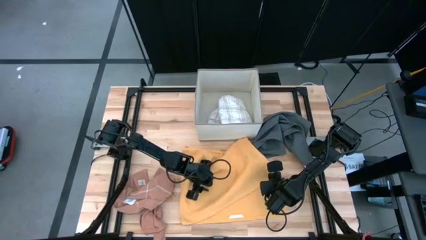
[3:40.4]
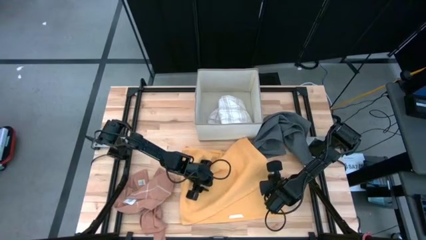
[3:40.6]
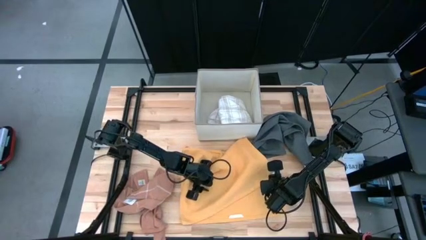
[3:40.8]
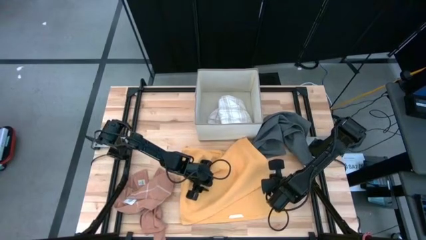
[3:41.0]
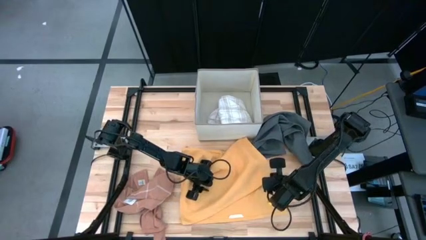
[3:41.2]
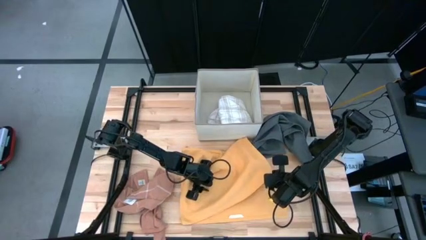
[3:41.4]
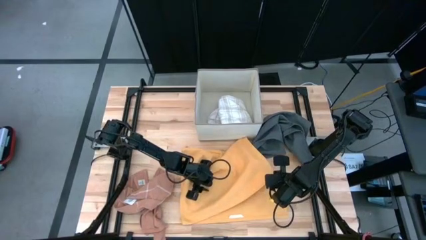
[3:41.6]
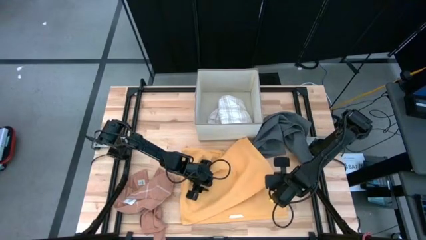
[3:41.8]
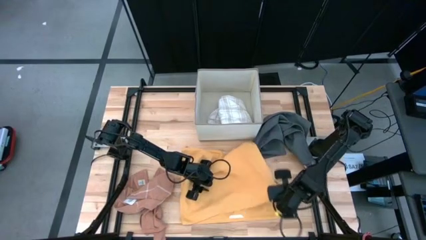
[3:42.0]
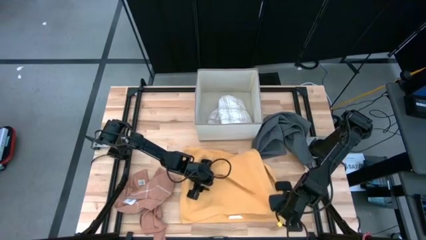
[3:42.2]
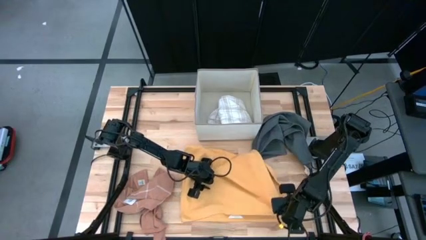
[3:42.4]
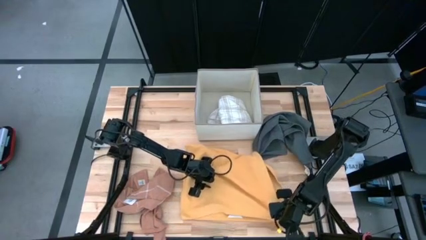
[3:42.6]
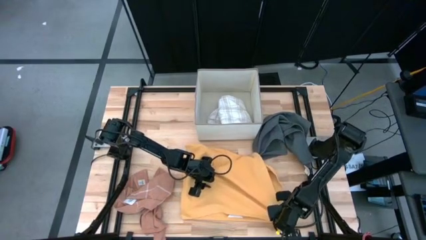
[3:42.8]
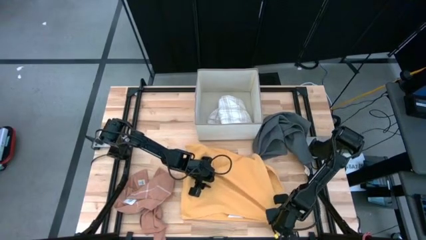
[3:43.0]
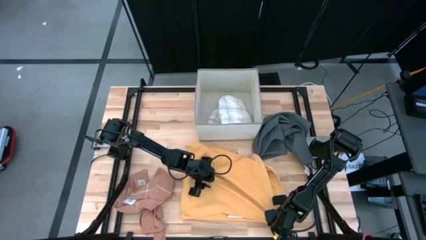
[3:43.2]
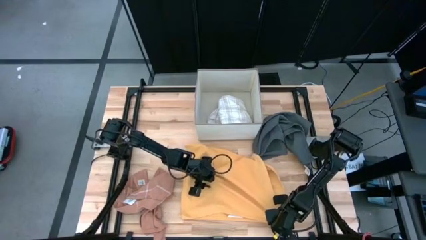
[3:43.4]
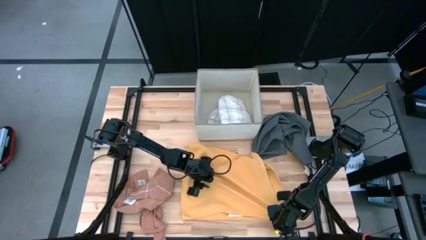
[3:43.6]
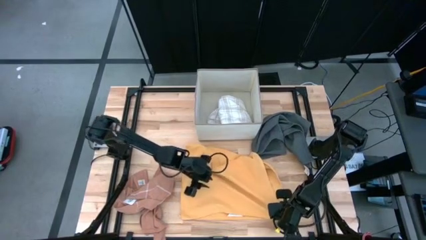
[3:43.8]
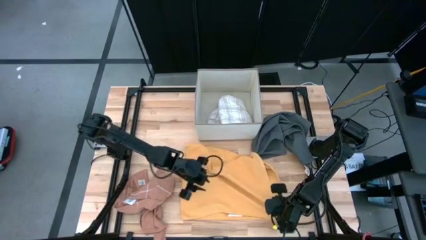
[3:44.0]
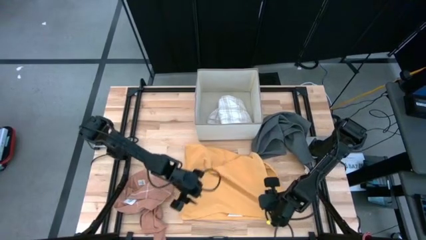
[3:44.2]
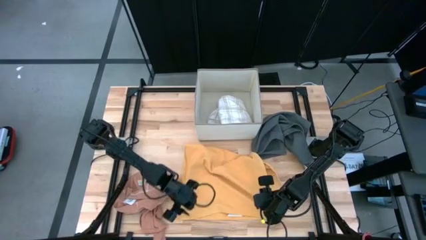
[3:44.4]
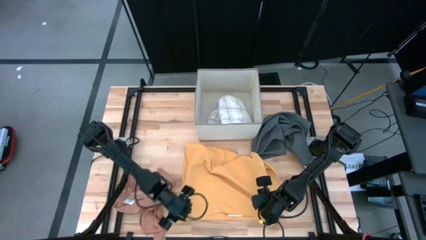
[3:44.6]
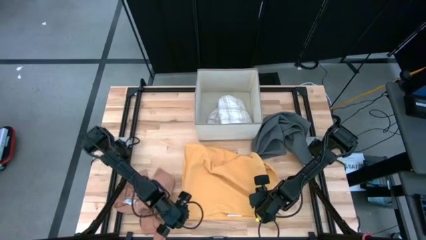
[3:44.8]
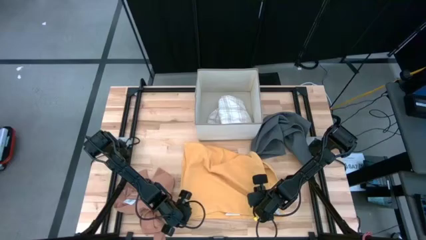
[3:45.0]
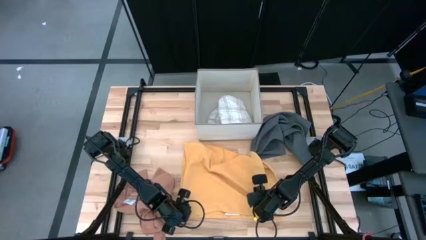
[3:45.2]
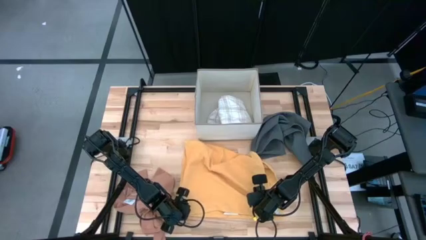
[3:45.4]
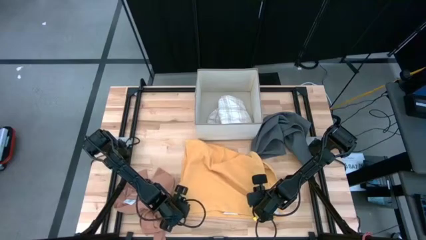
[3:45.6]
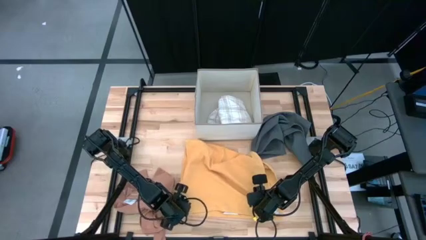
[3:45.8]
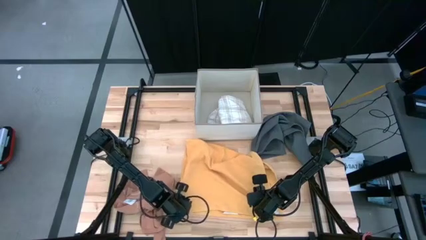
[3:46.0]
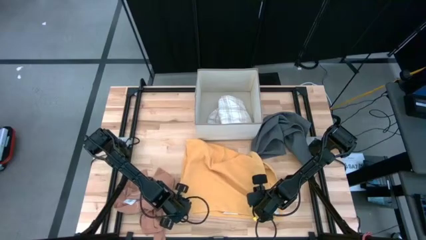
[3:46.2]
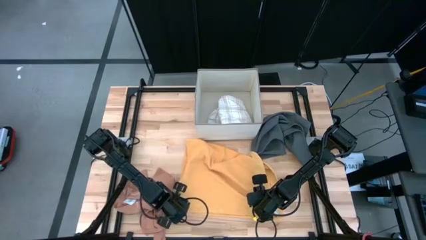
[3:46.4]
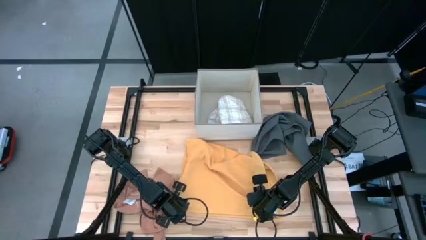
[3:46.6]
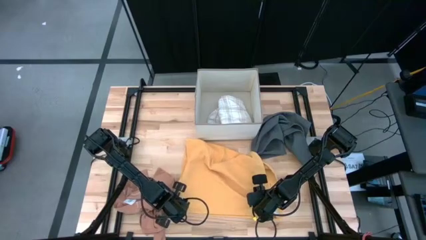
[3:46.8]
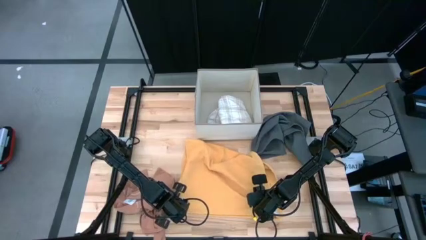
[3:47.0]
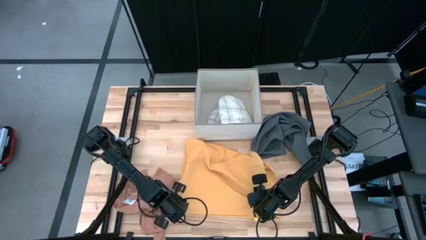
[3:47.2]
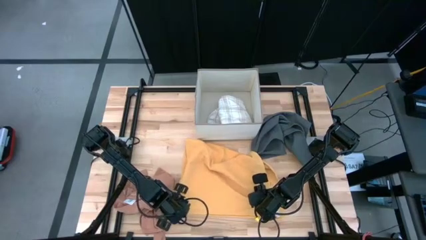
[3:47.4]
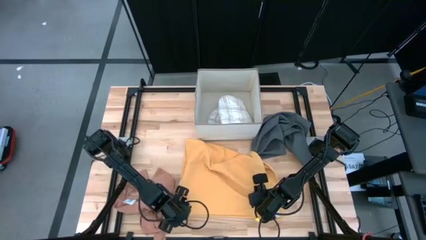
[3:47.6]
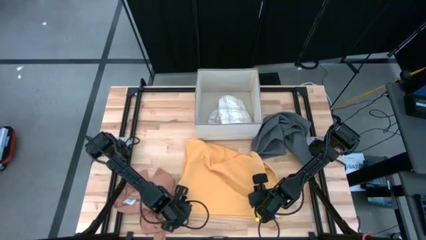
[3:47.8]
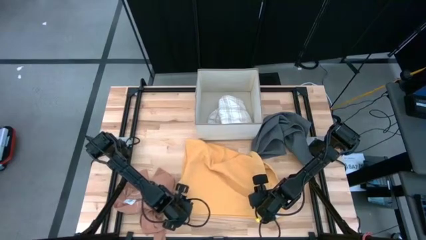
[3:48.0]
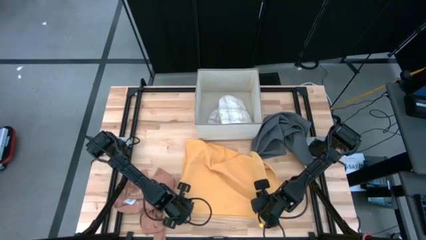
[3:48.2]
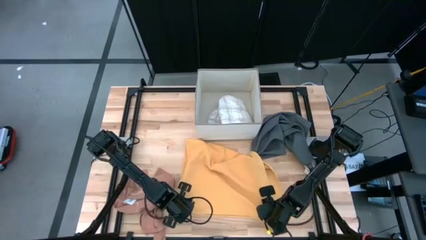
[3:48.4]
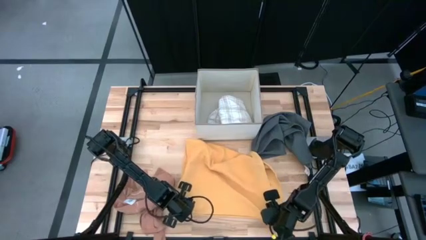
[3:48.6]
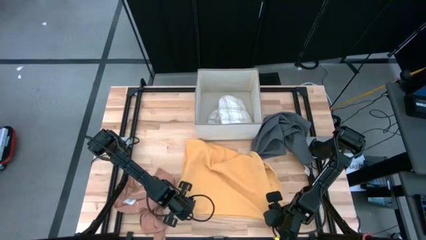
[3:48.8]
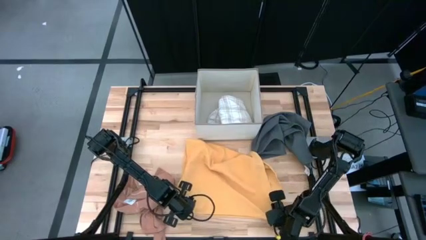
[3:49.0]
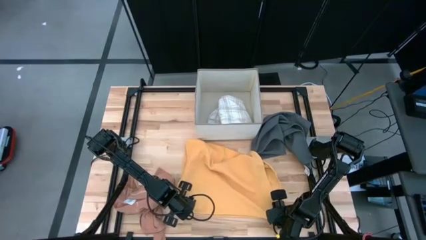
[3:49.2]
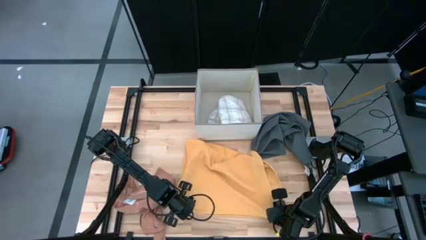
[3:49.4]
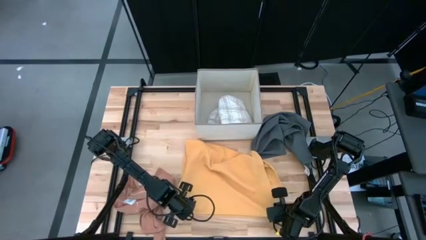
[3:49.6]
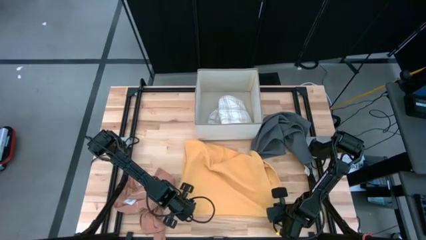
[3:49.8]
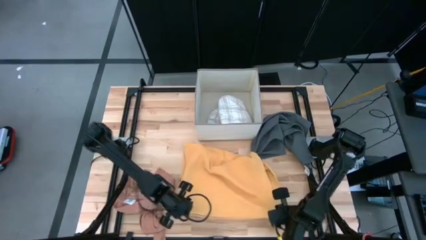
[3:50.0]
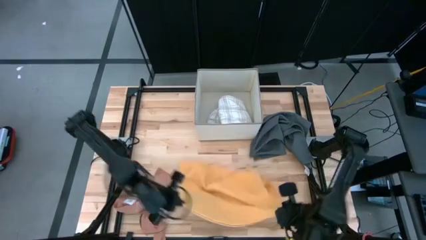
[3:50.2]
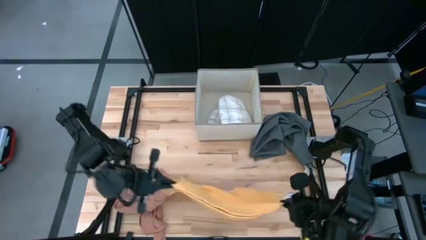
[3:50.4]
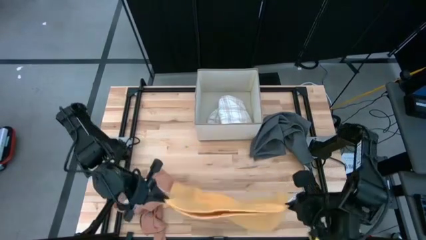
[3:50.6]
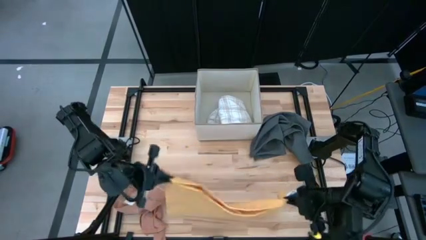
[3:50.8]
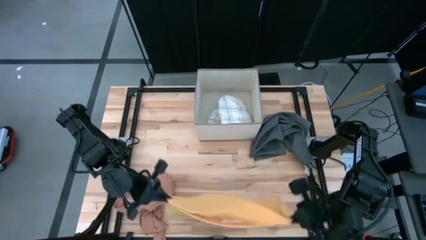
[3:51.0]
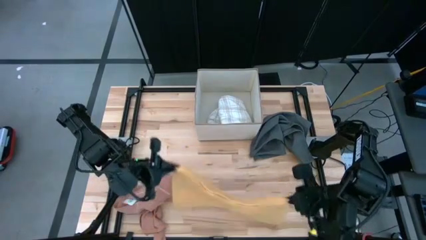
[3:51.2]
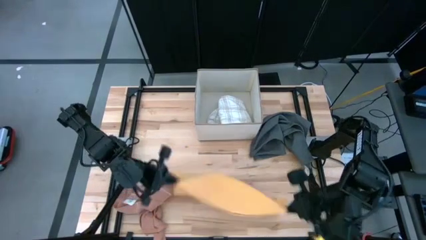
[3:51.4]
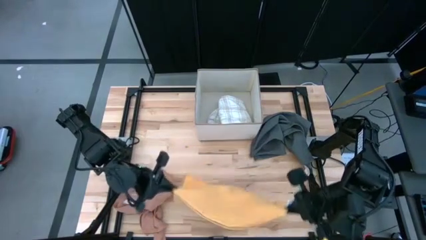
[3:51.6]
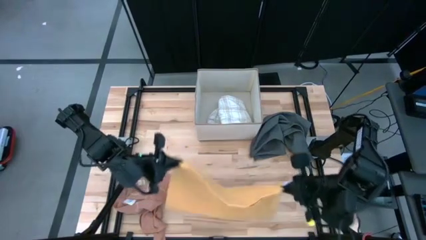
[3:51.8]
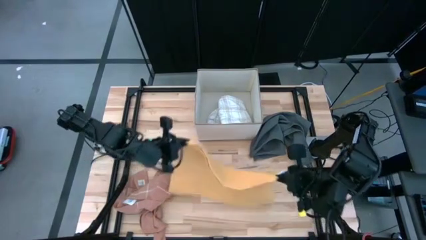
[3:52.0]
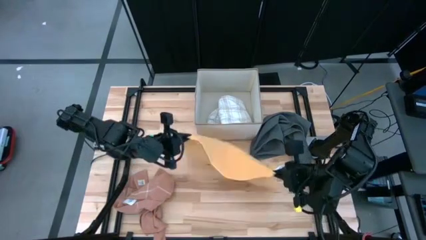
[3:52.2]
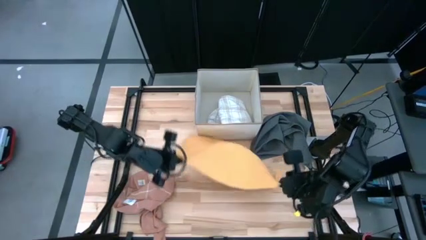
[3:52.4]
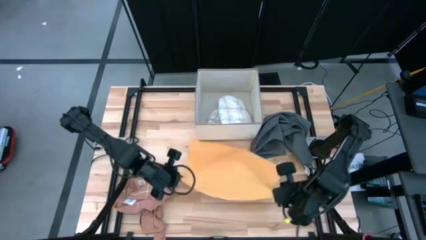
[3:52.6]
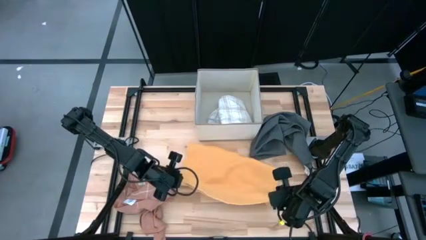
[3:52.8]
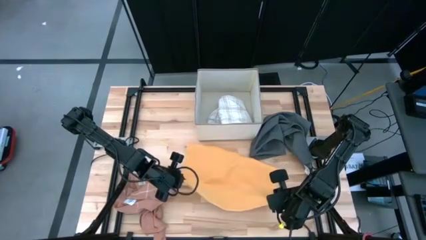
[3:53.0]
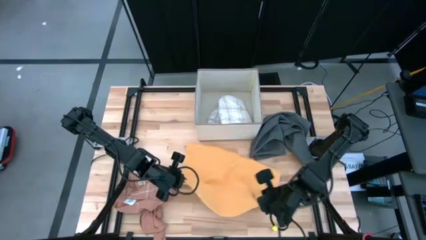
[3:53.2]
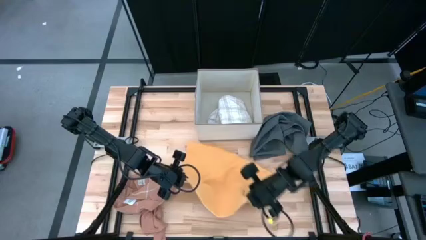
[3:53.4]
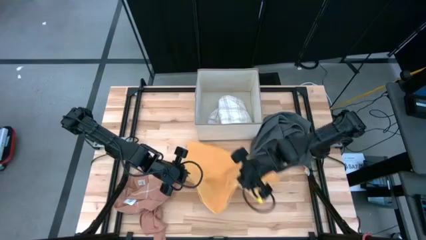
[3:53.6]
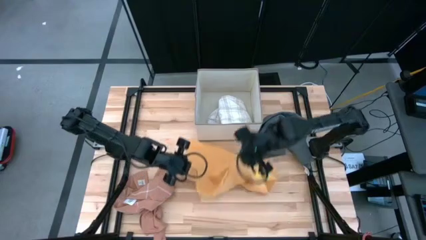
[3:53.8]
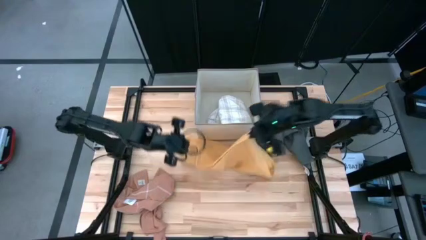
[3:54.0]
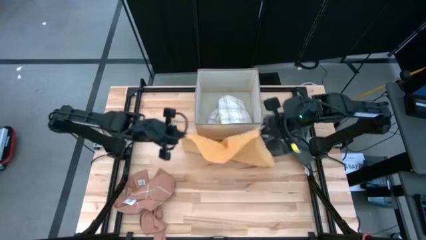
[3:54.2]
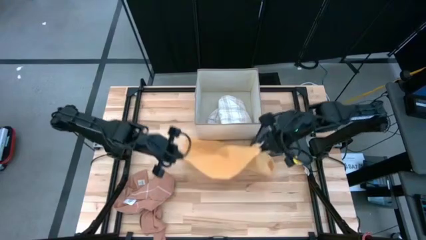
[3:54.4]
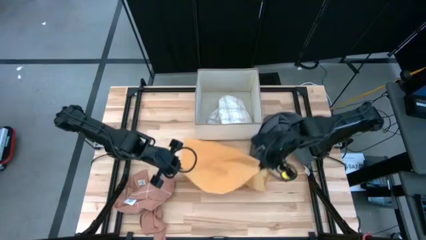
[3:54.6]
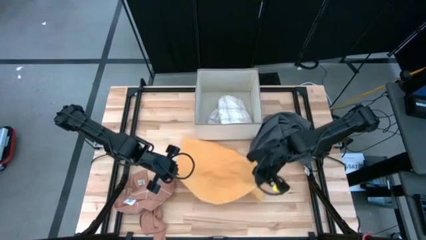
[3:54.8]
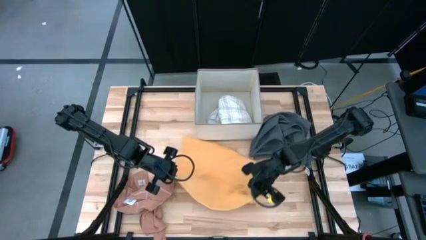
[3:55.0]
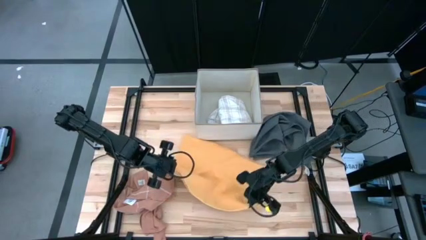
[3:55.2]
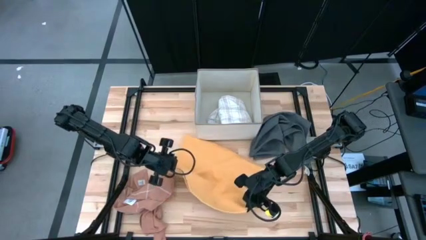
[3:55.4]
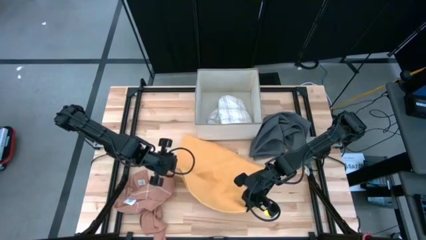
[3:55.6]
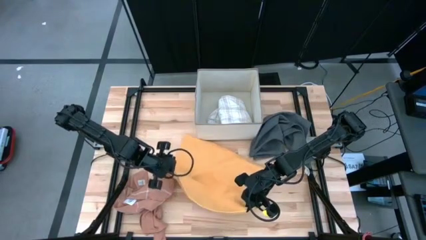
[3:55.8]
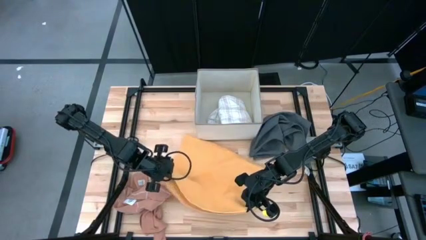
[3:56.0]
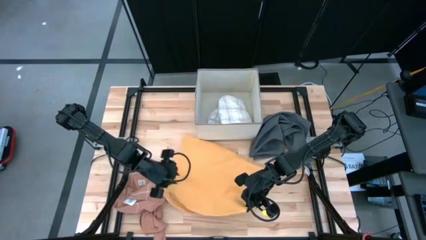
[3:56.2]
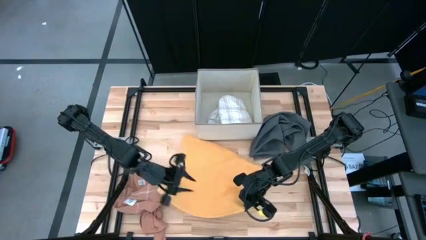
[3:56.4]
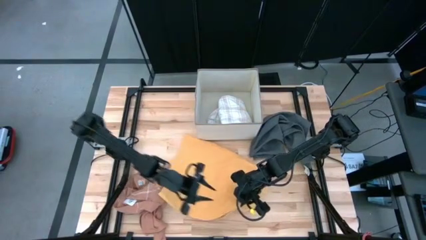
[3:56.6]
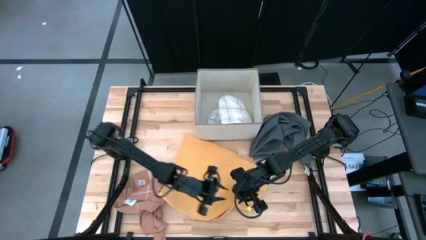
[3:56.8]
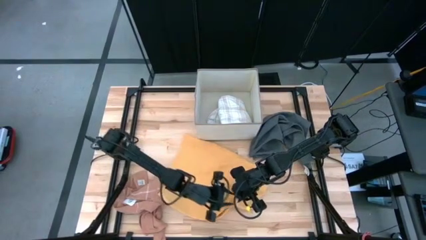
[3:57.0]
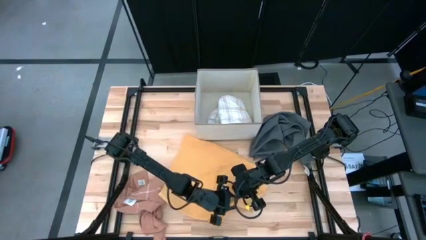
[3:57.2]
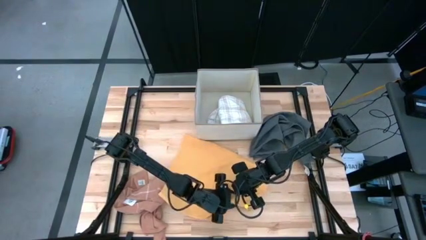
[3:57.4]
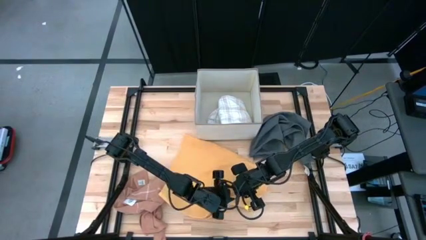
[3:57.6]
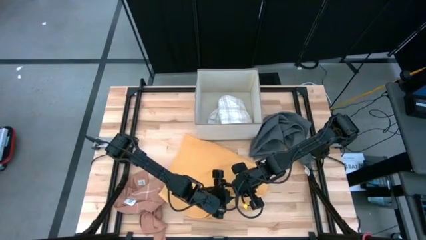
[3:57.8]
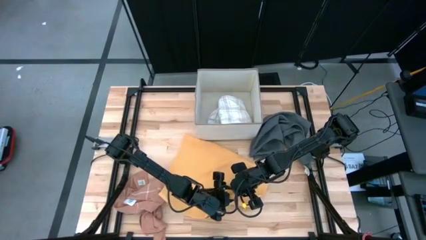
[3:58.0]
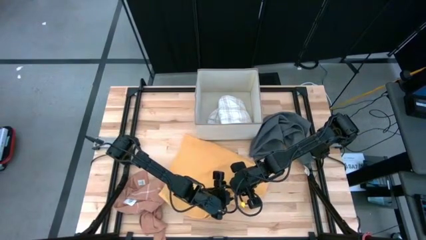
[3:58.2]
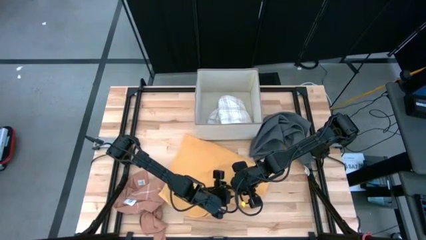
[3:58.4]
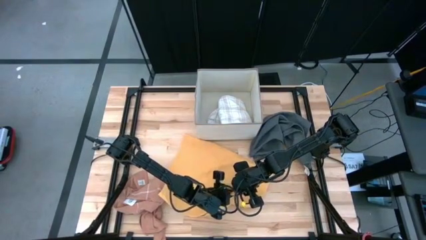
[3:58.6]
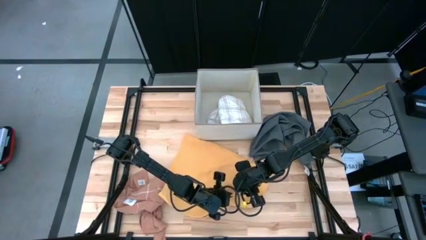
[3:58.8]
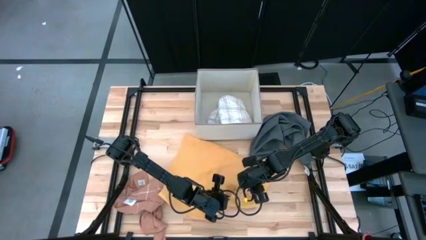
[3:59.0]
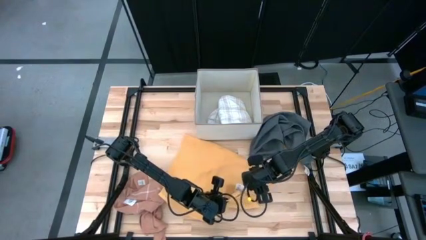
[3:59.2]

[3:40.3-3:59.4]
Task: Fold towel
Fold the yellow towel
